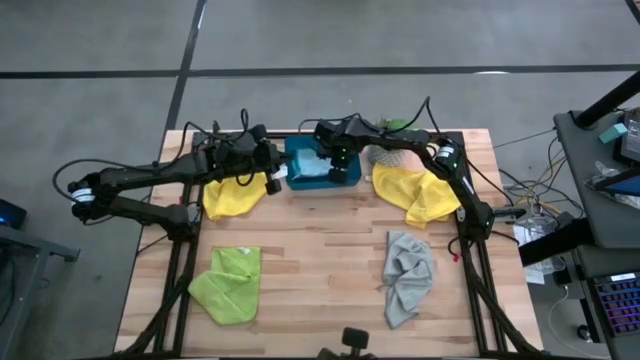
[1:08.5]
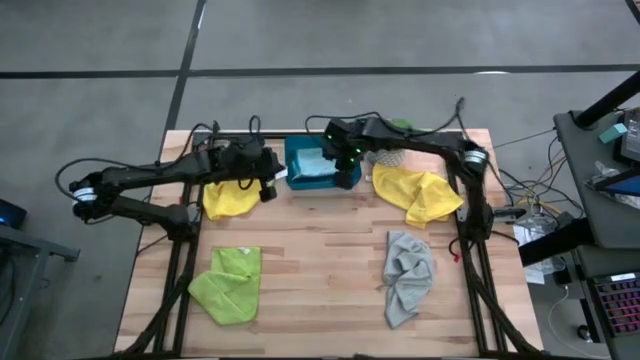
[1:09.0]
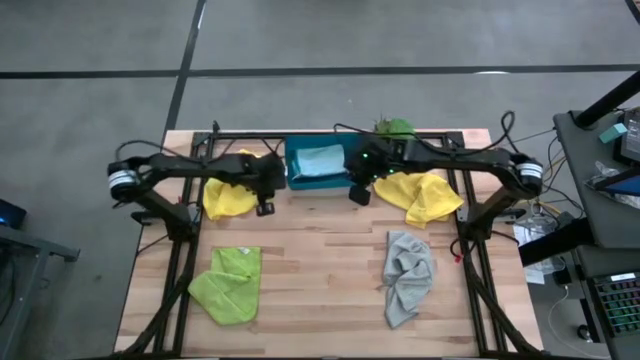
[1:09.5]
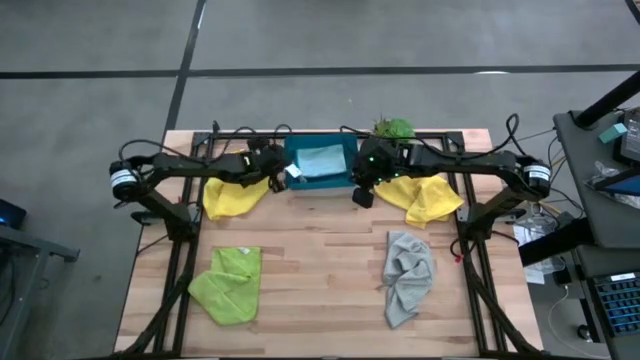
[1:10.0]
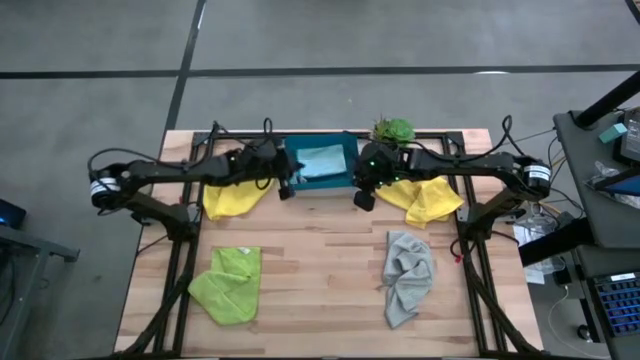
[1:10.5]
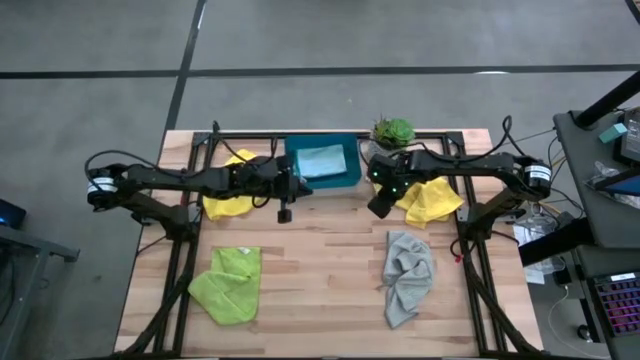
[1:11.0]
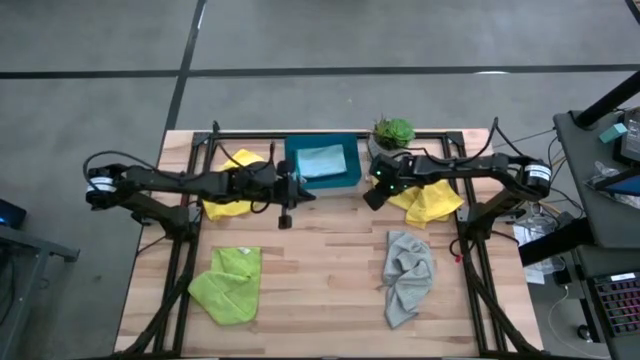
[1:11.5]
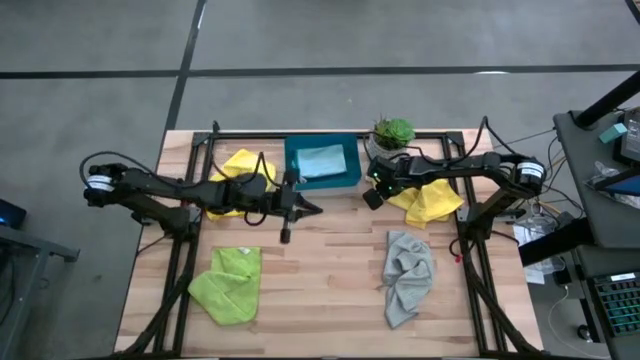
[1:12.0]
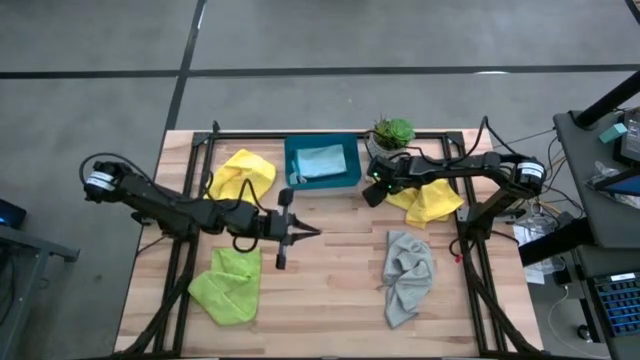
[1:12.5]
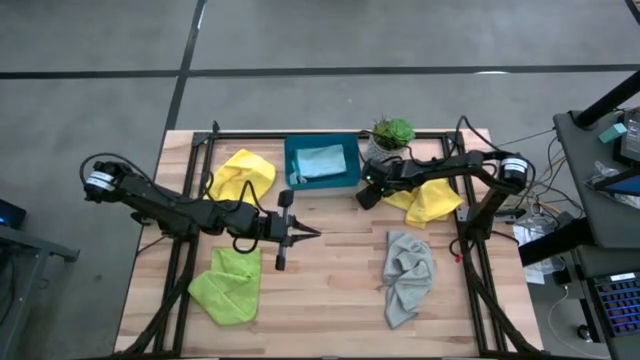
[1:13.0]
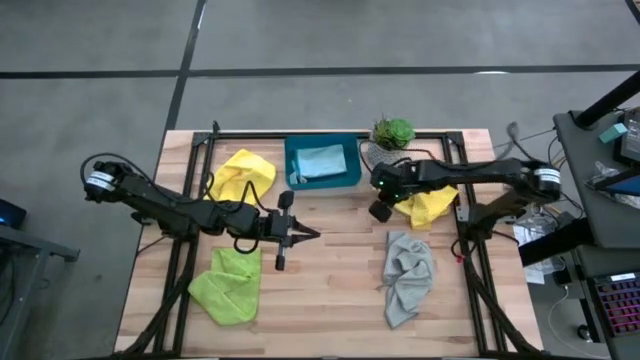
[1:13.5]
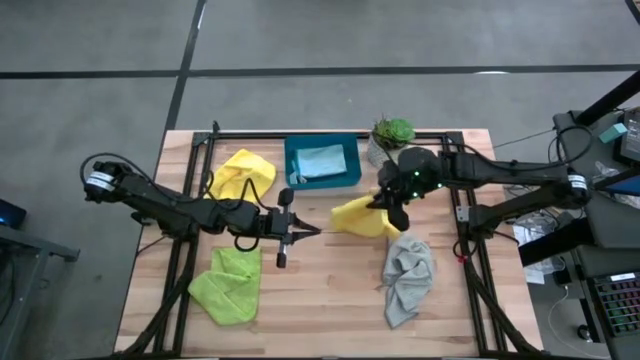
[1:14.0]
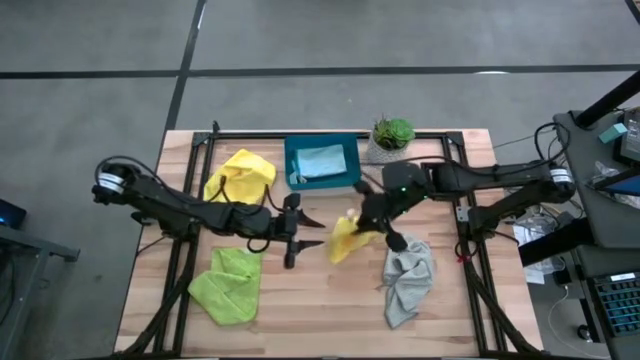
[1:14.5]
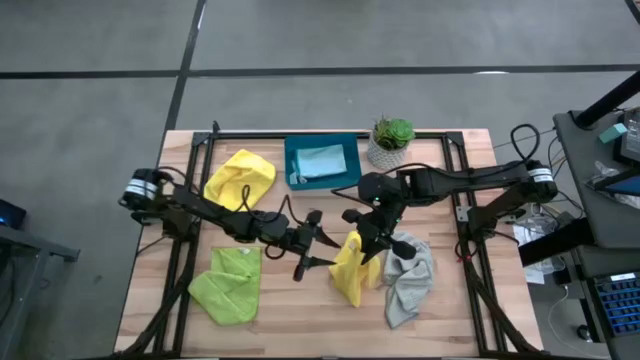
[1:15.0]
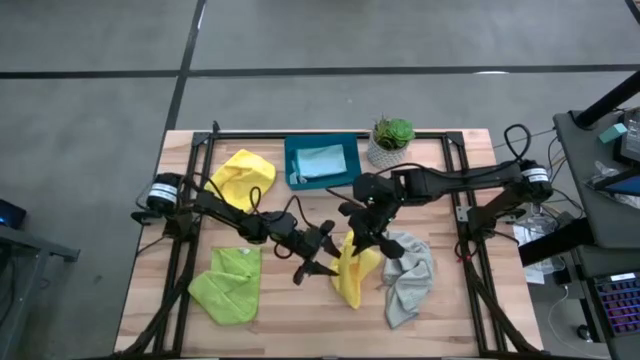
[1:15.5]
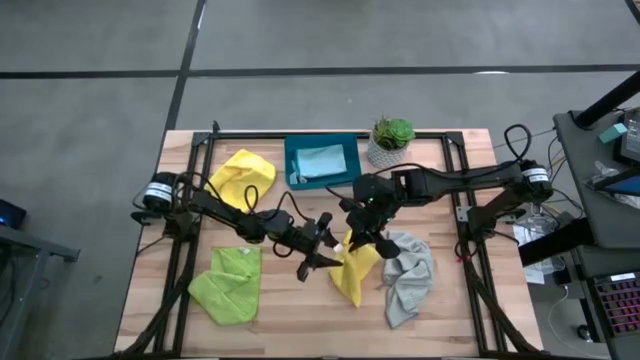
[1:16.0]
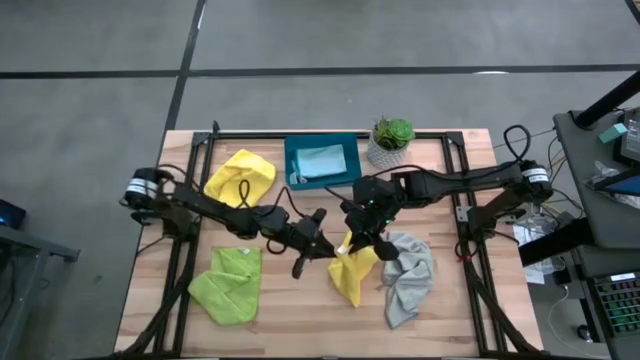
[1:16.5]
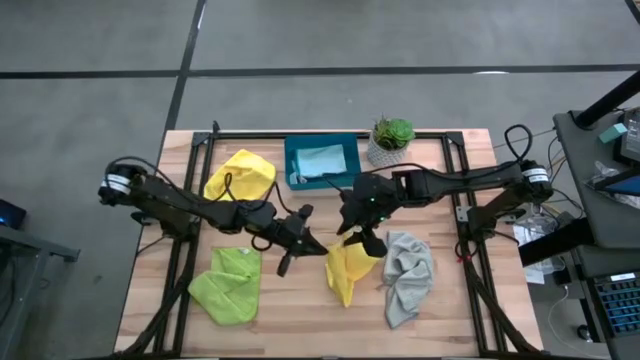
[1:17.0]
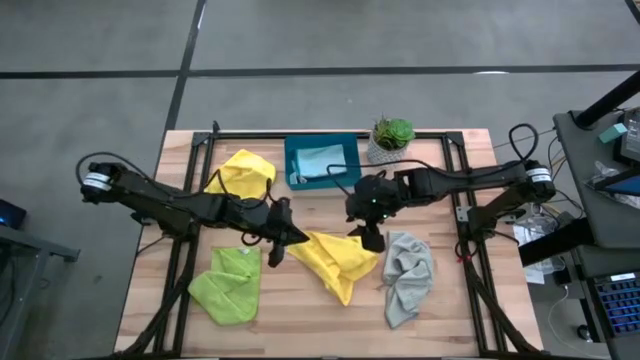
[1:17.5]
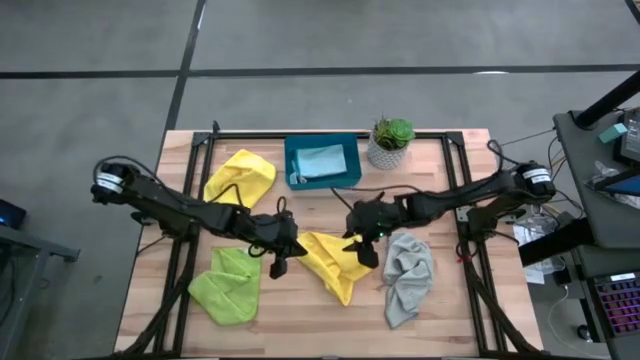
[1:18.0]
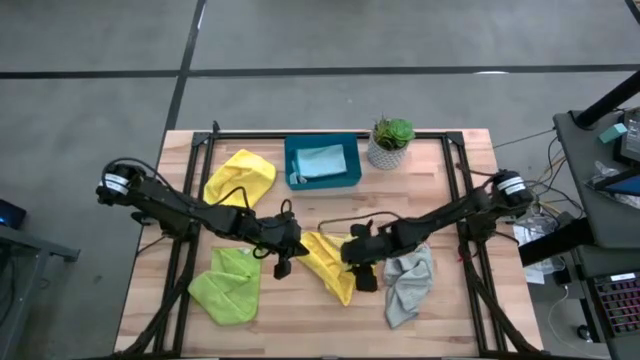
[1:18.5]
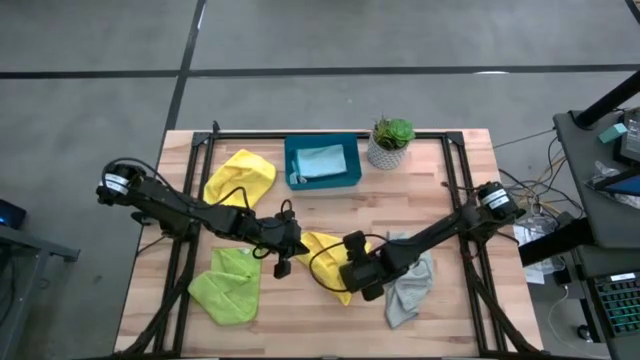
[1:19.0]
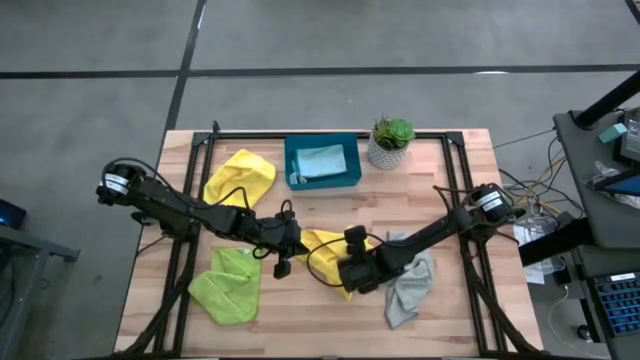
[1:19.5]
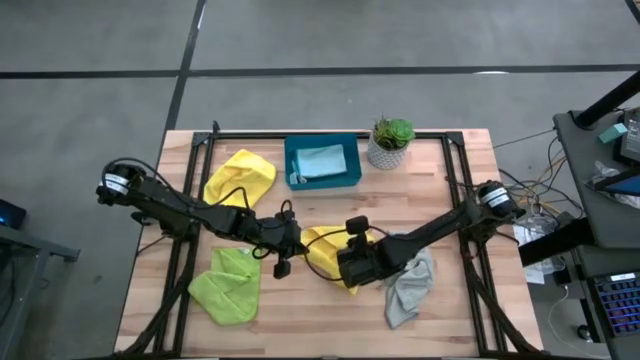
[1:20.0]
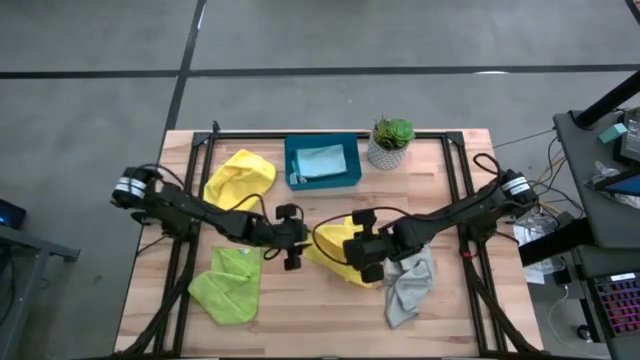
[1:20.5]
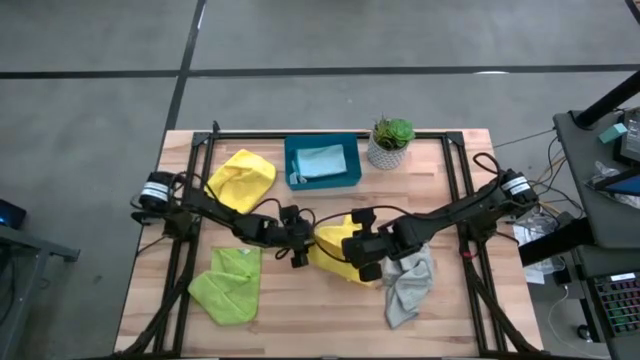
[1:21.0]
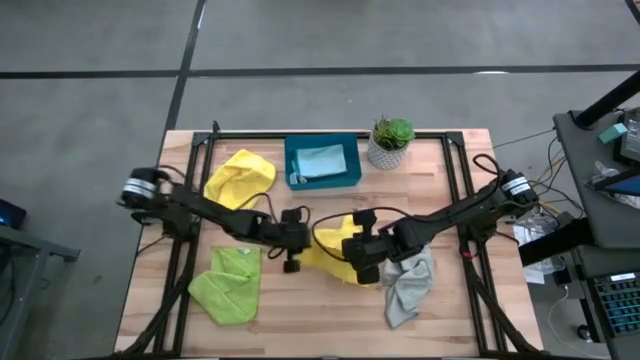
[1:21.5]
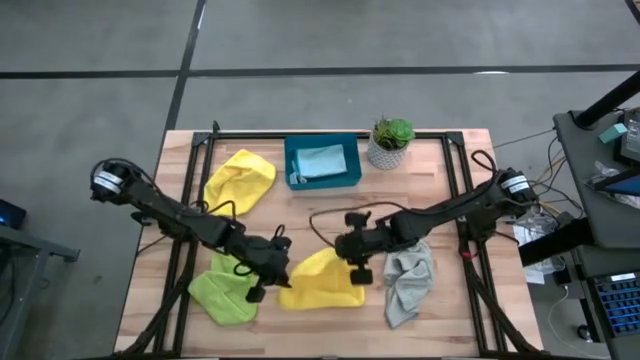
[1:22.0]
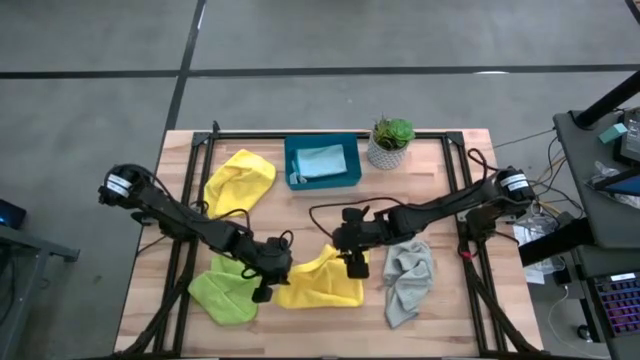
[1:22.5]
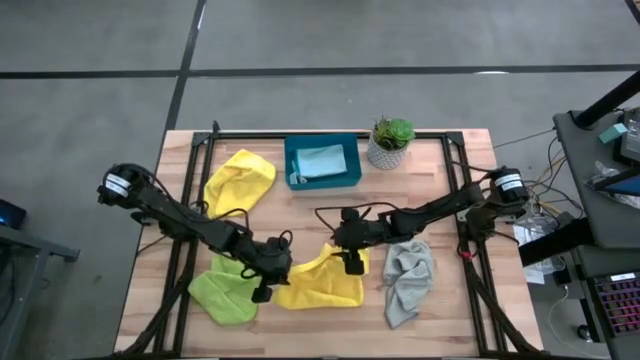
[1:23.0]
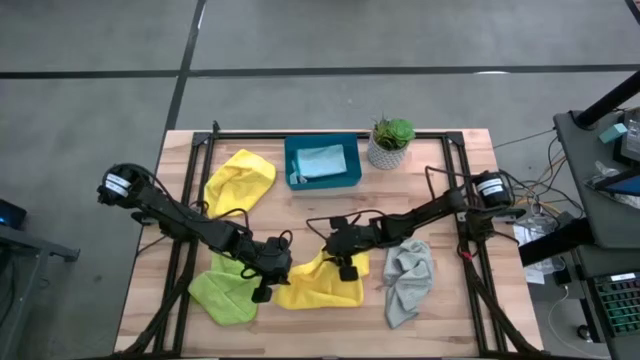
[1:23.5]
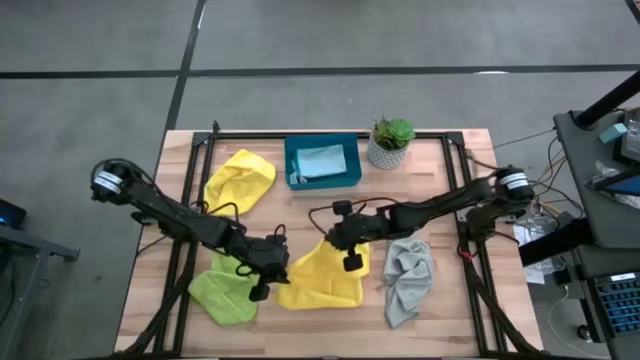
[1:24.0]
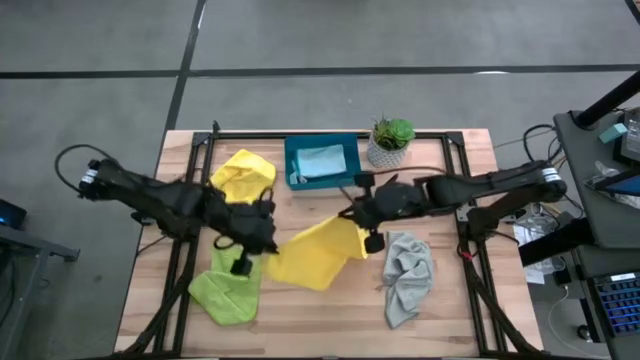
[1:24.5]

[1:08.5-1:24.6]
Task: Fold microfiber towels
Fold the right yellow microfiber cloth

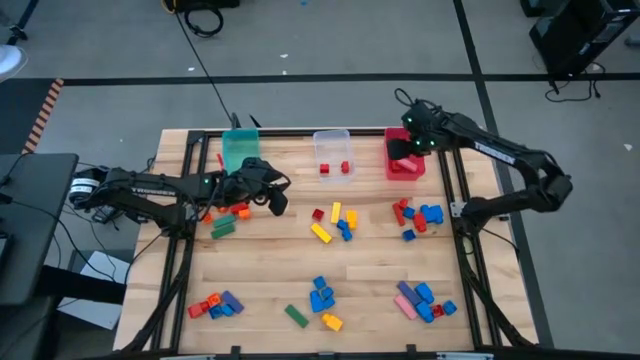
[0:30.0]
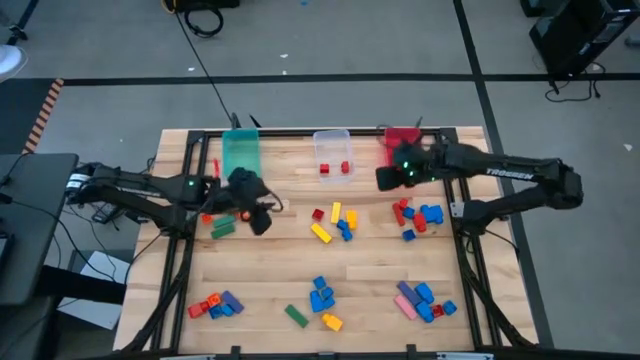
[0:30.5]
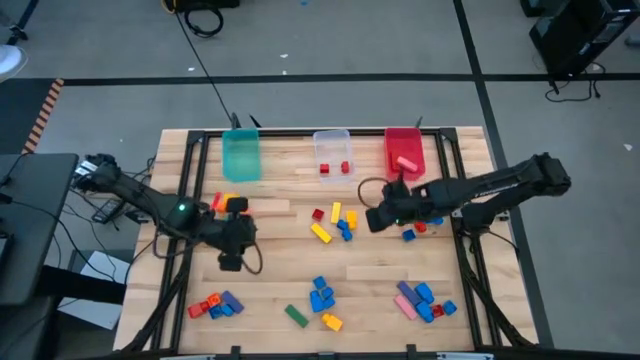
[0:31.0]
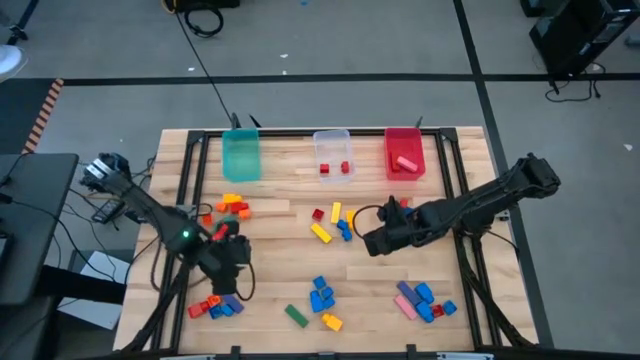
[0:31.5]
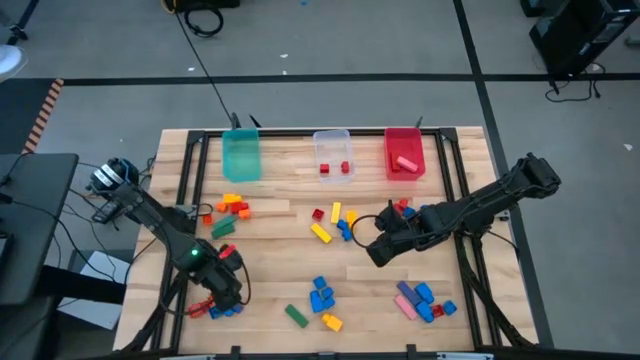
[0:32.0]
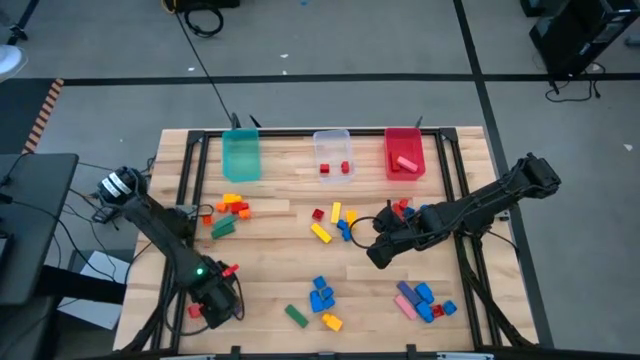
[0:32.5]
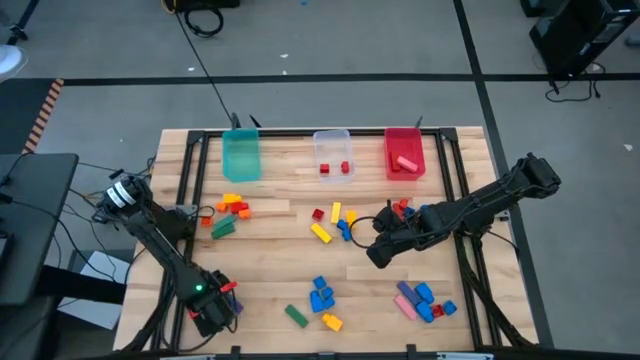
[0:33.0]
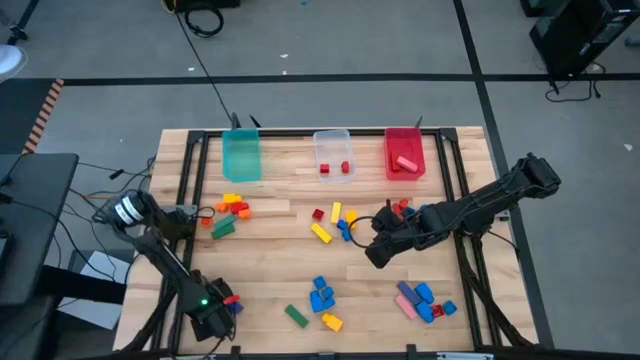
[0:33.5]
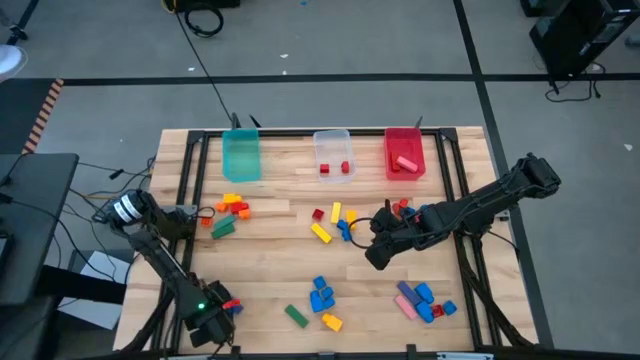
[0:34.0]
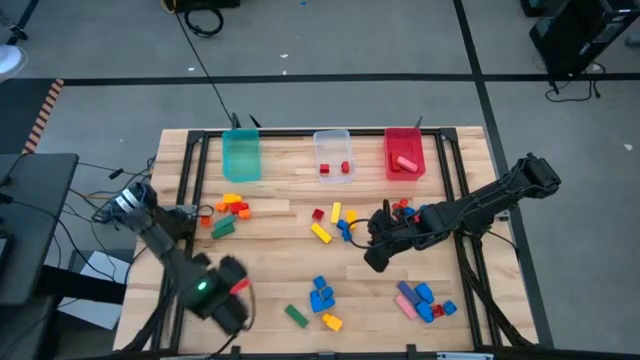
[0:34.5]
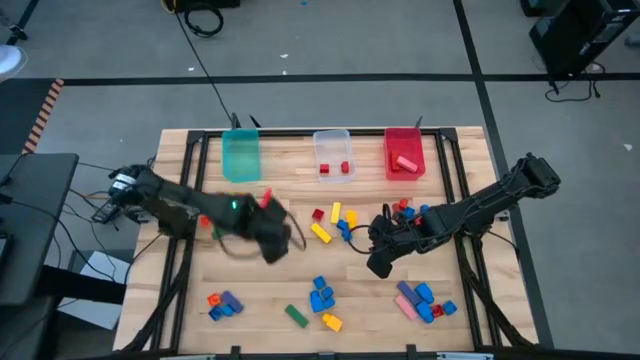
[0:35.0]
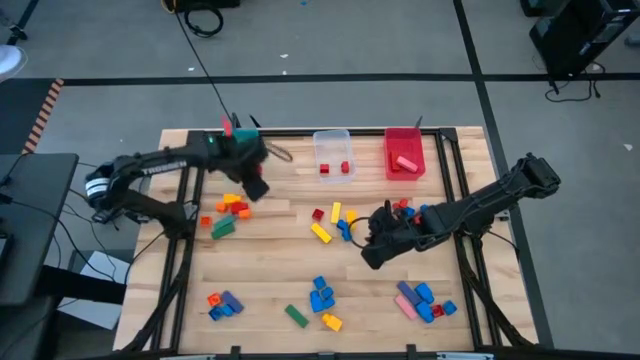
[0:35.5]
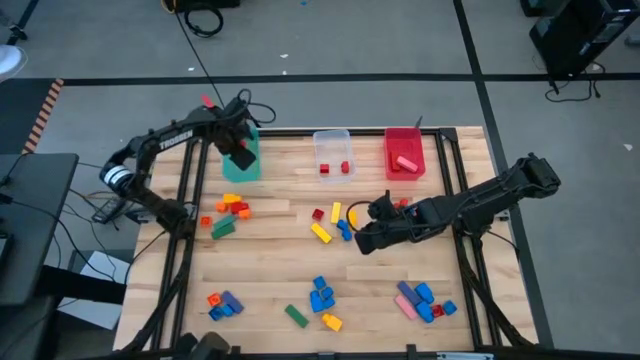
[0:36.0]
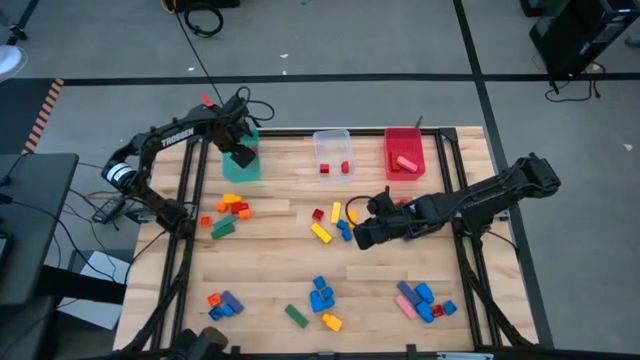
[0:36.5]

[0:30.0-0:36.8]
Task: Sort blocks by size
Put the red 1 stud game piece into the blue bin
